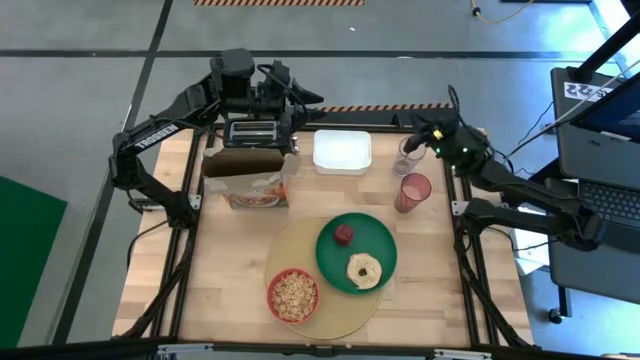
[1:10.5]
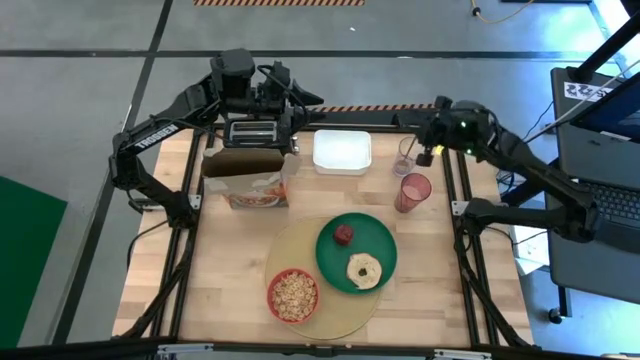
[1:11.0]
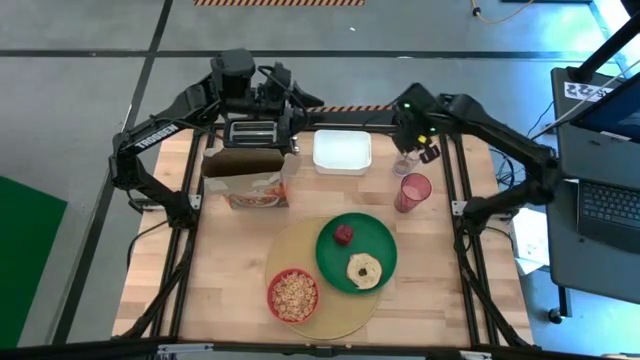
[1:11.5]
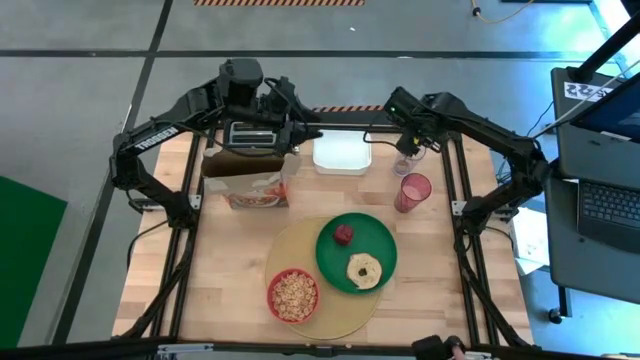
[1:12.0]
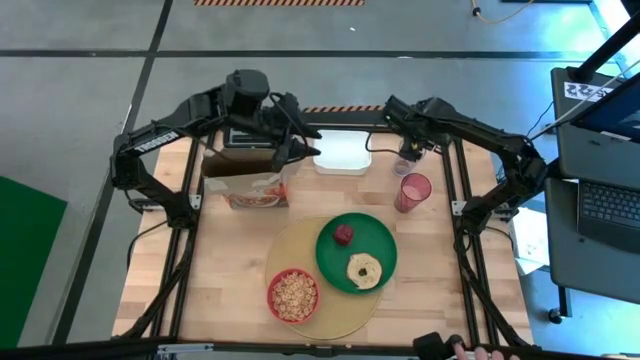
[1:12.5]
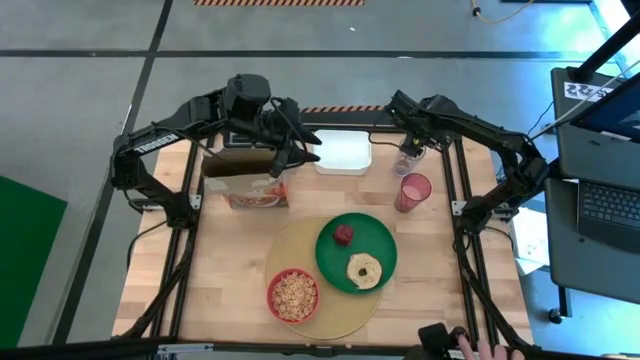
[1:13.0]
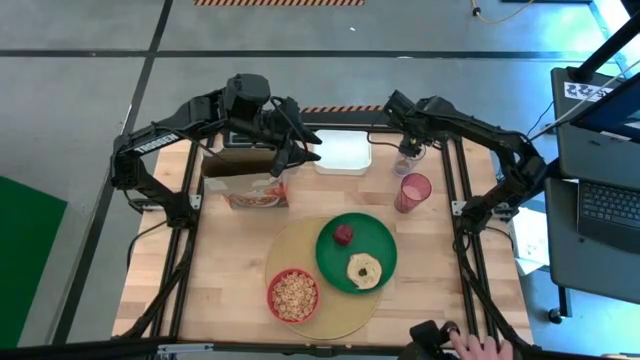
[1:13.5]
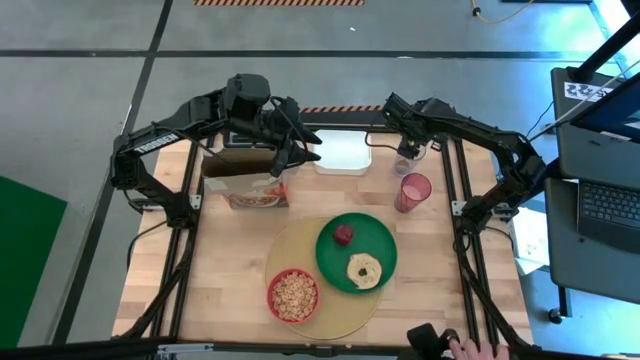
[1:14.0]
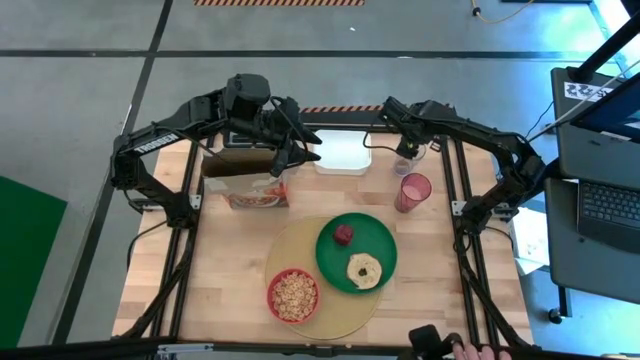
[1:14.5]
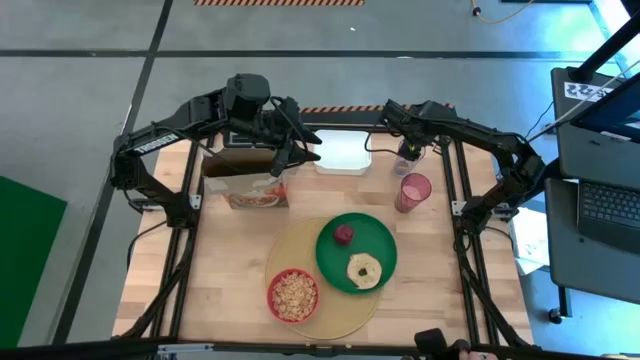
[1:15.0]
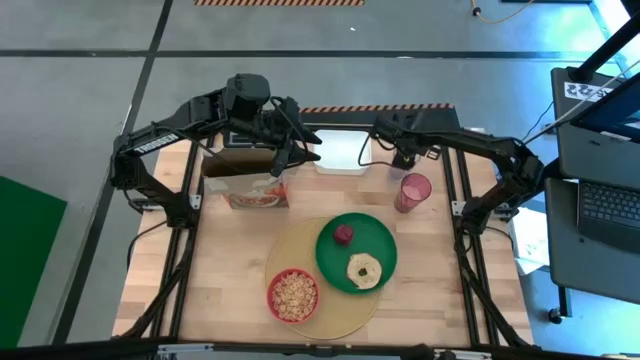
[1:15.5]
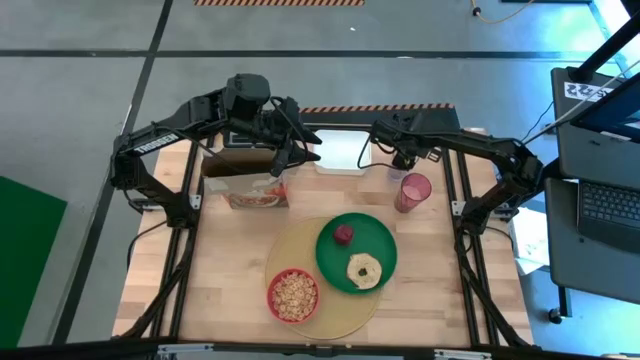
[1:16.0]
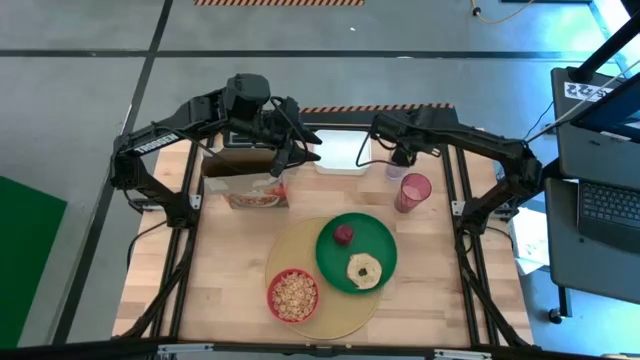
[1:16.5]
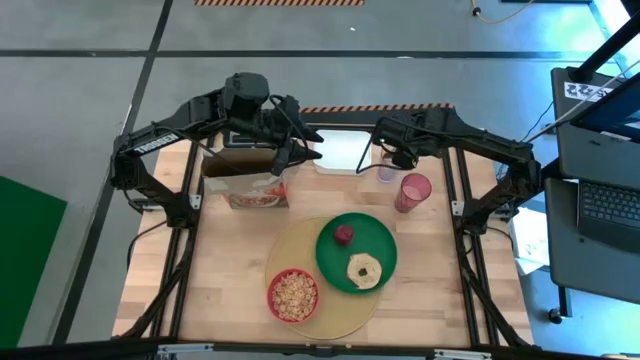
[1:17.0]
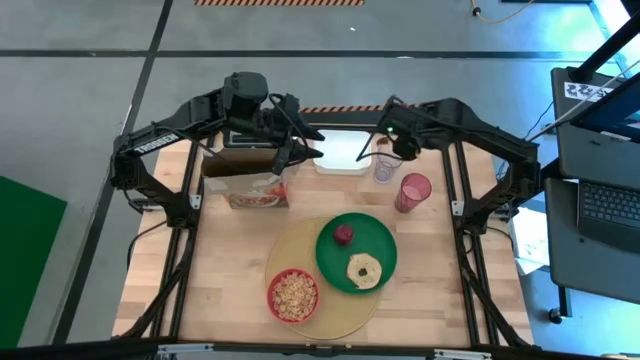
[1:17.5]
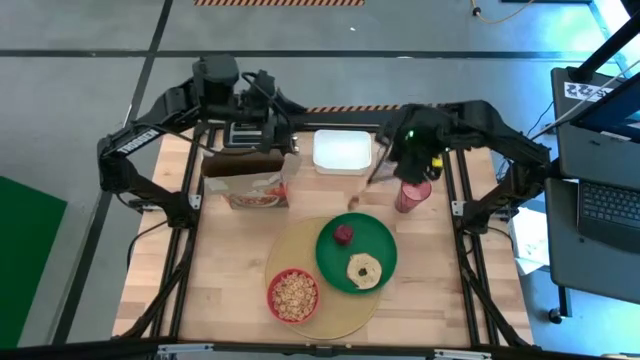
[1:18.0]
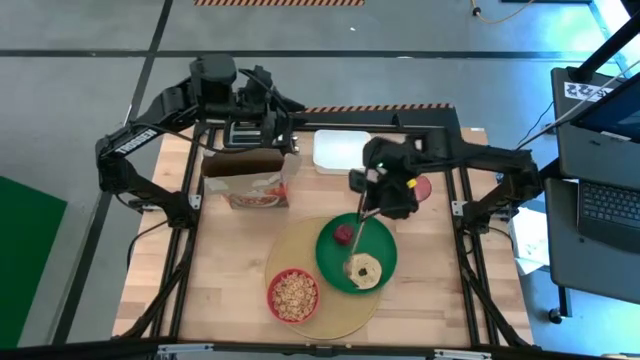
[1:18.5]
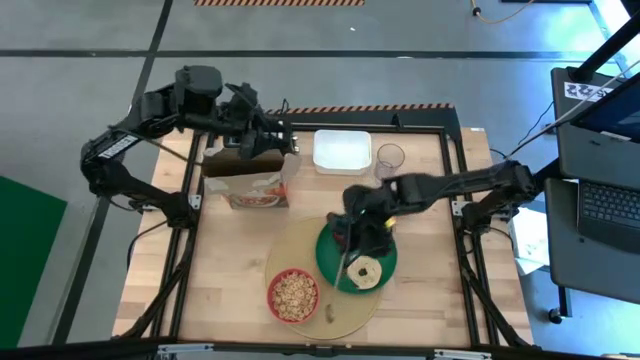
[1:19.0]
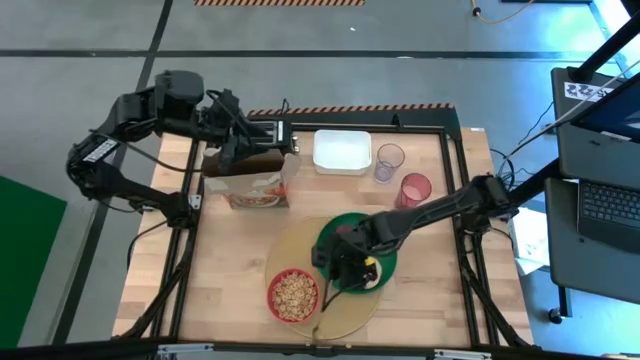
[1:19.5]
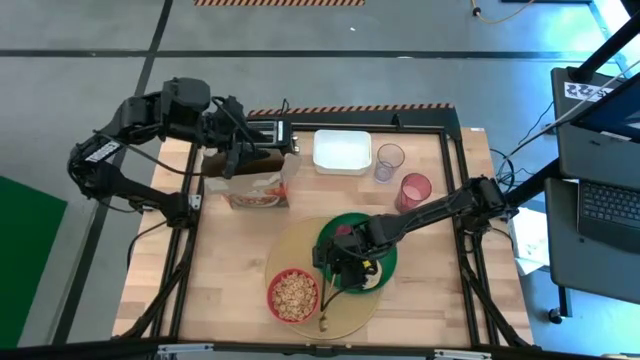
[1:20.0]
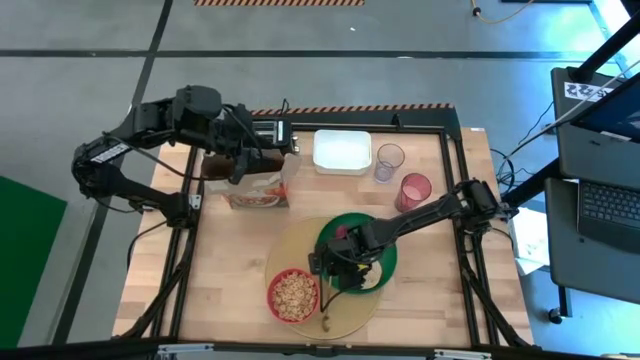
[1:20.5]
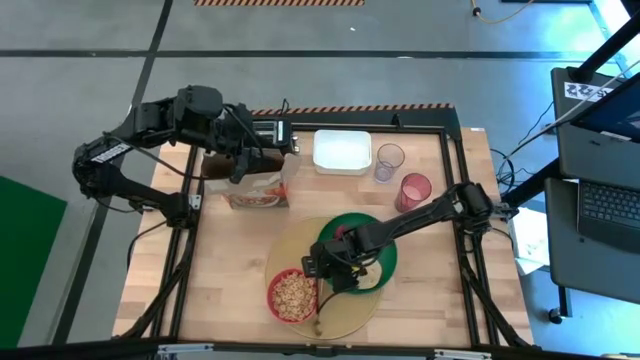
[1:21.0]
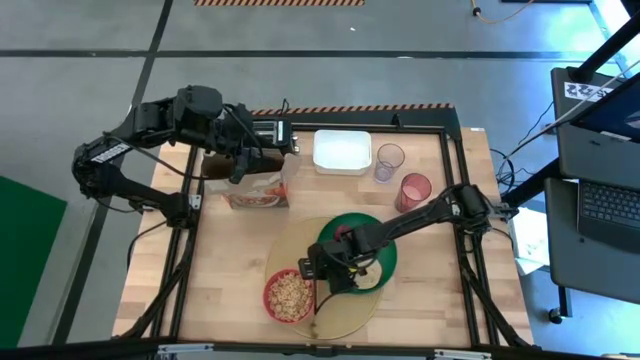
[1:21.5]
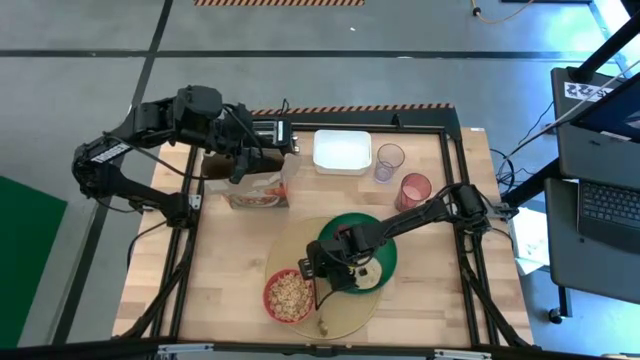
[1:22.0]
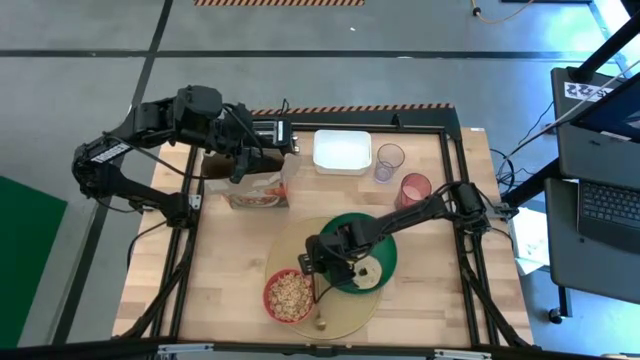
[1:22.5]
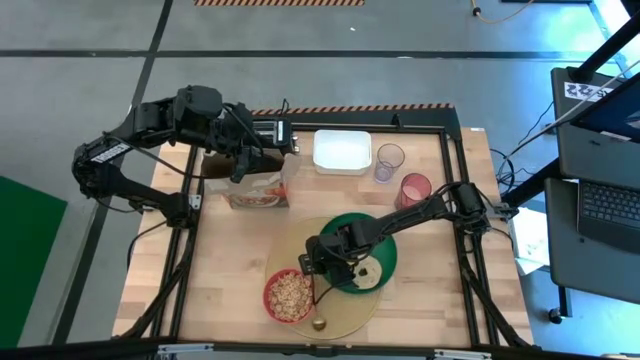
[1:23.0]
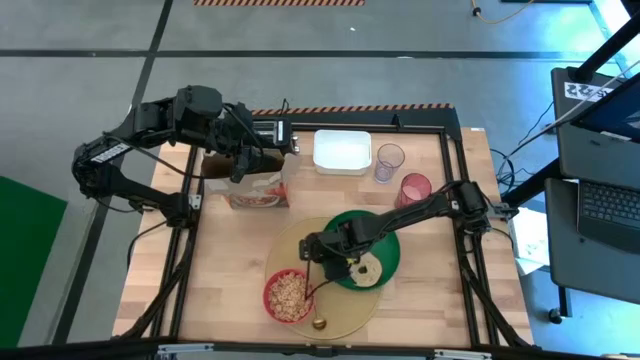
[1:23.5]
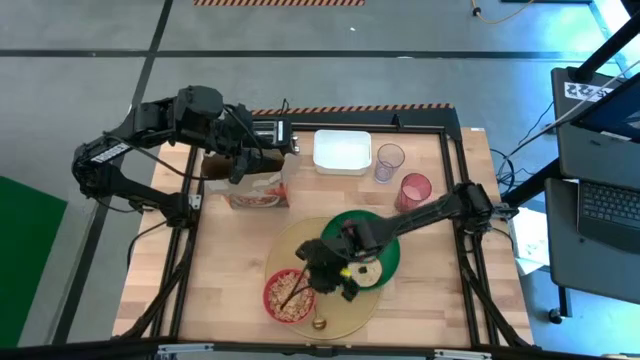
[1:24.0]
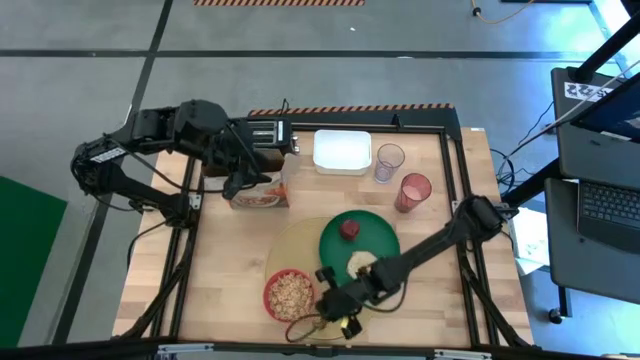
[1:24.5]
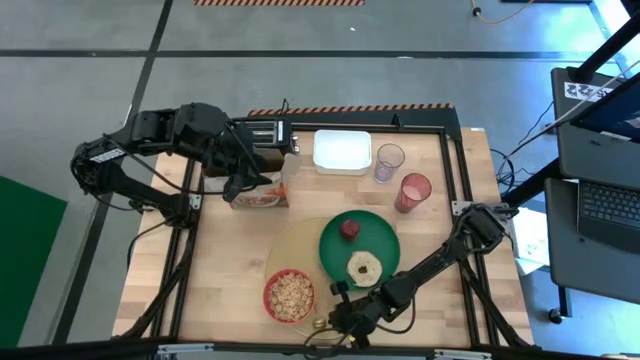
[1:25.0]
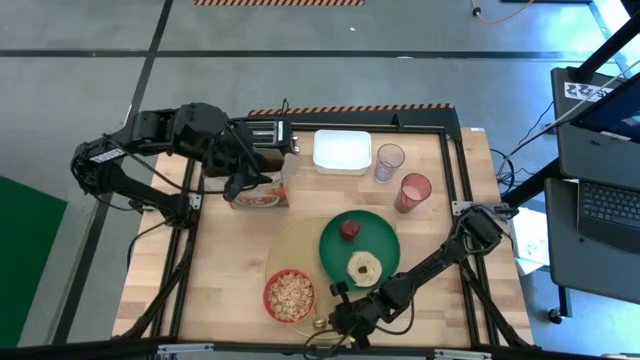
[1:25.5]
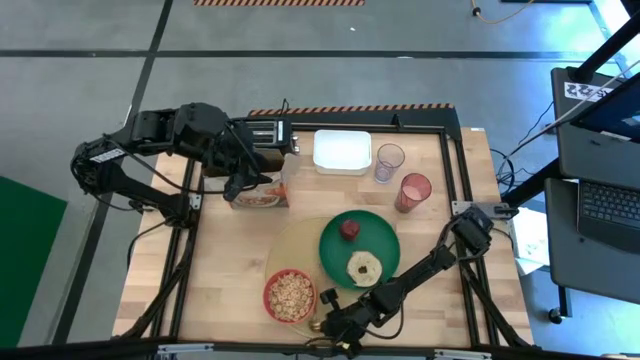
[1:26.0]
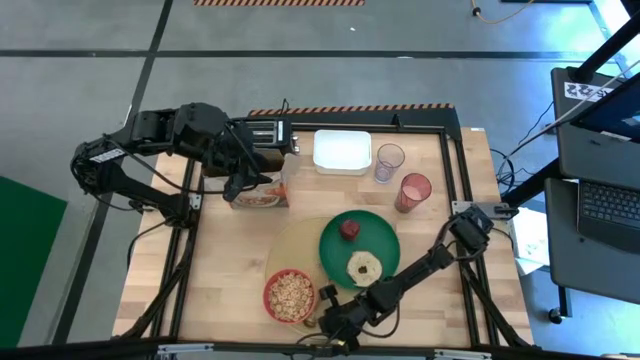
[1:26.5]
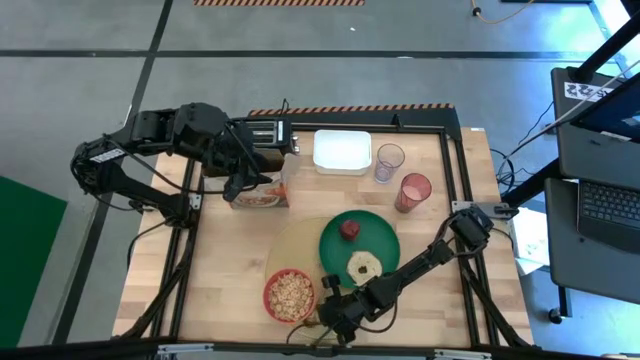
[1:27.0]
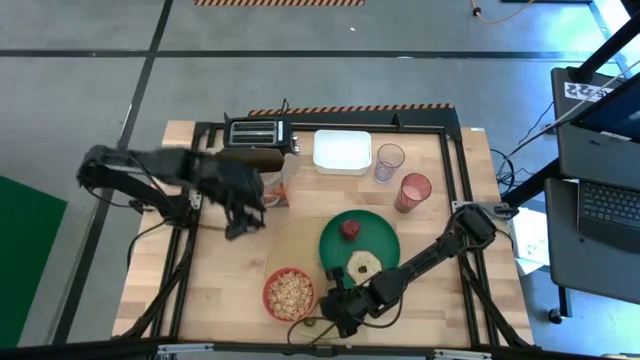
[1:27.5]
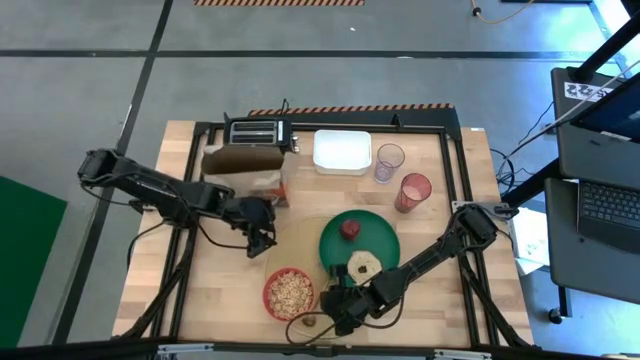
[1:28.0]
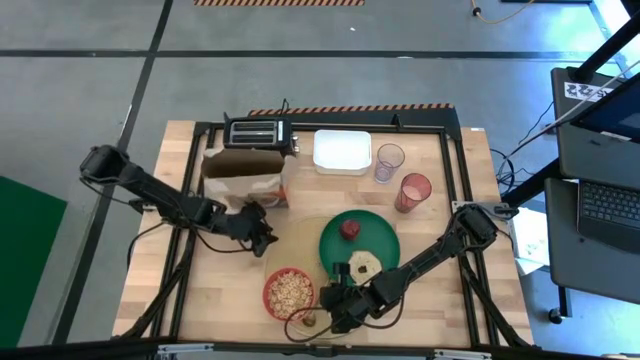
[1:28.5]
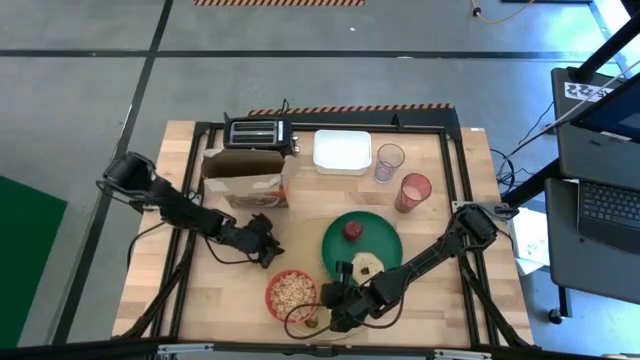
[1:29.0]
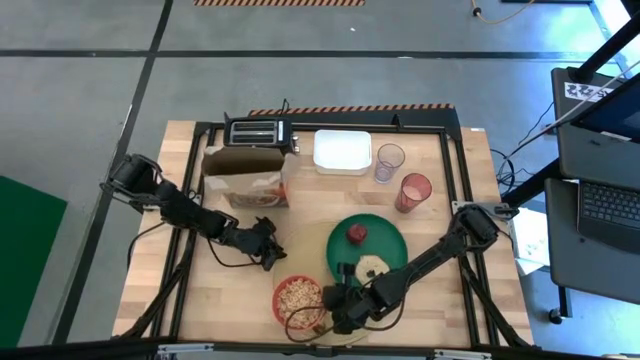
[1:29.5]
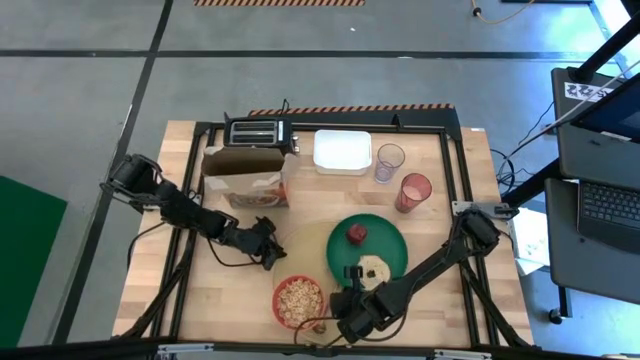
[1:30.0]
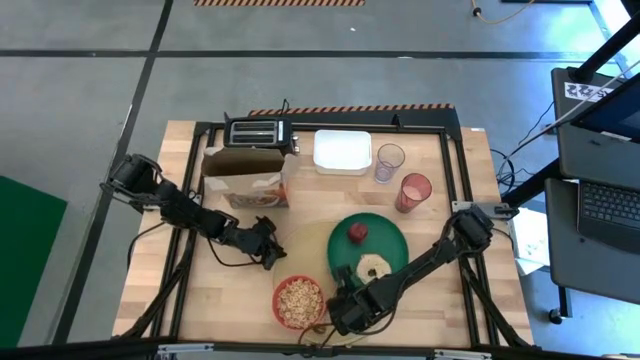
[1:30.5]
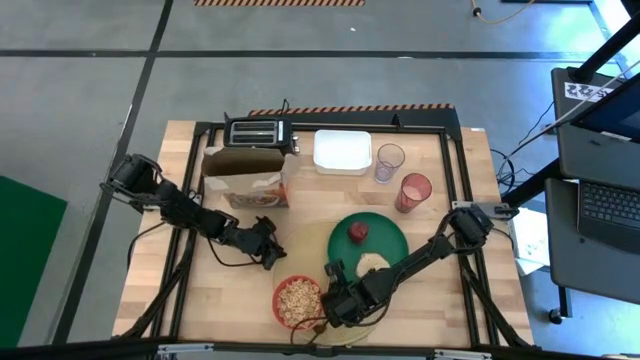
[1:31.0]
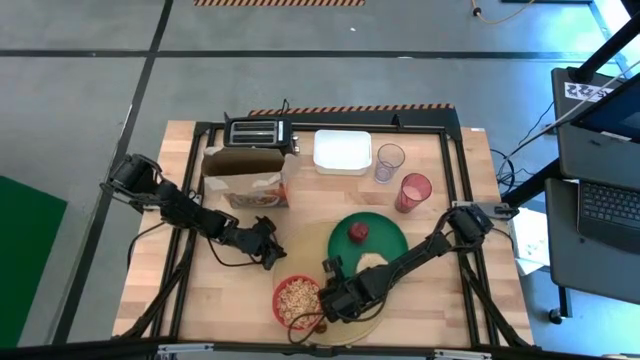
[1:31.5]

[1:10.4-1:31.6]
Task: Arrange a breakfast setting
Put the gold spoon on the brown placemat to the right of the orange bowl
